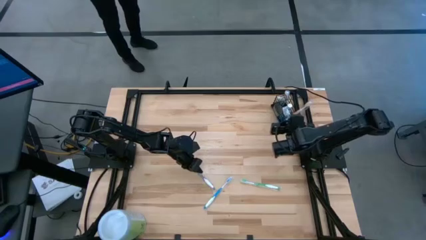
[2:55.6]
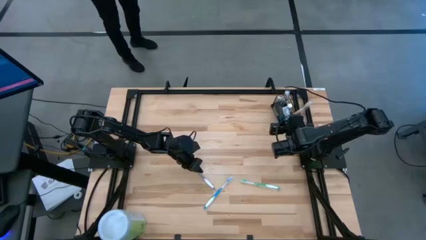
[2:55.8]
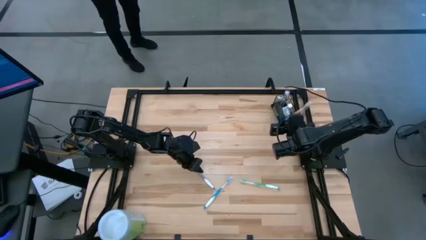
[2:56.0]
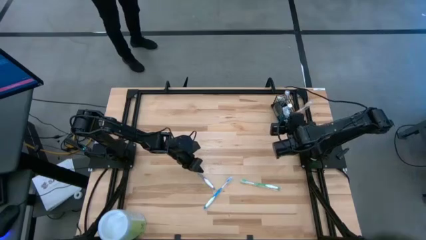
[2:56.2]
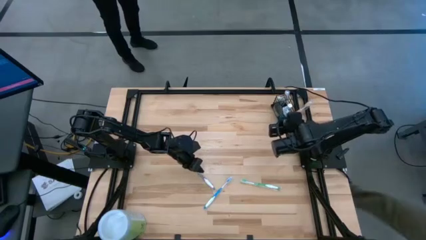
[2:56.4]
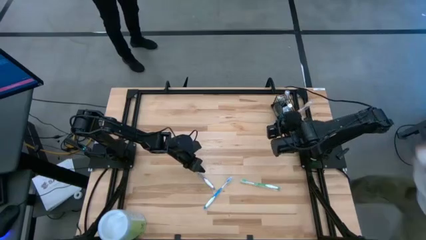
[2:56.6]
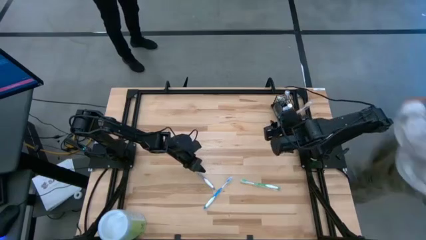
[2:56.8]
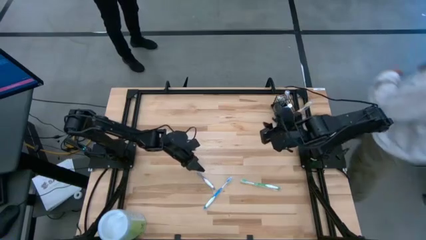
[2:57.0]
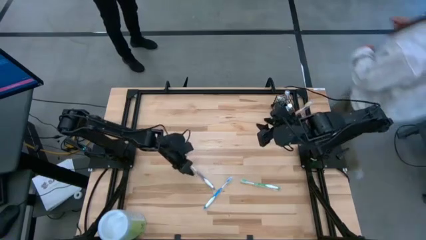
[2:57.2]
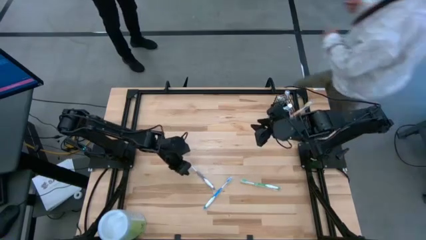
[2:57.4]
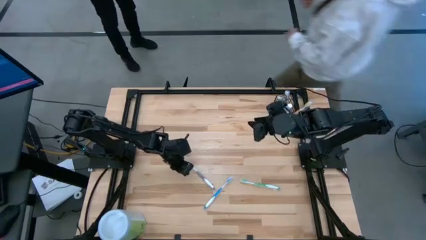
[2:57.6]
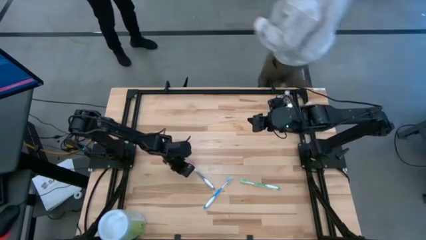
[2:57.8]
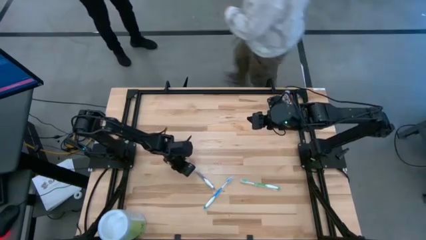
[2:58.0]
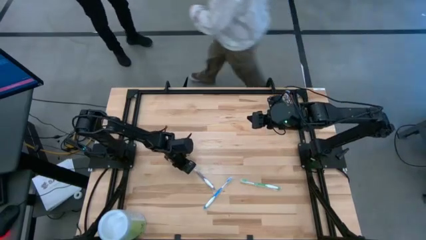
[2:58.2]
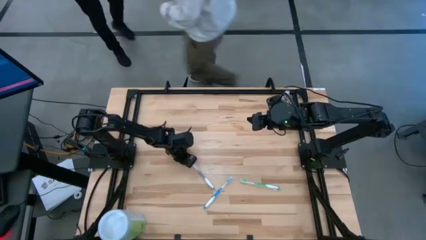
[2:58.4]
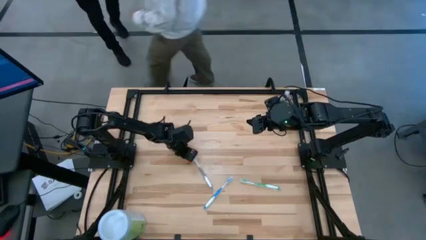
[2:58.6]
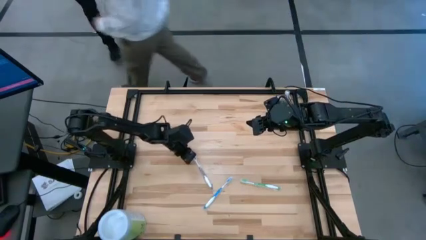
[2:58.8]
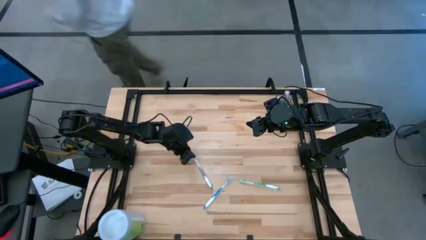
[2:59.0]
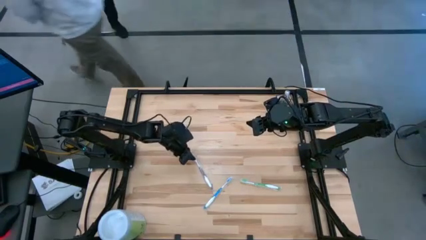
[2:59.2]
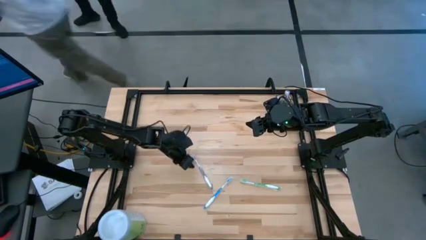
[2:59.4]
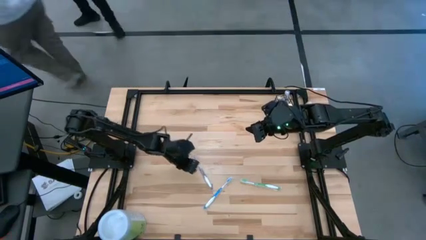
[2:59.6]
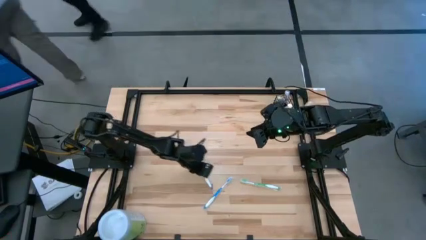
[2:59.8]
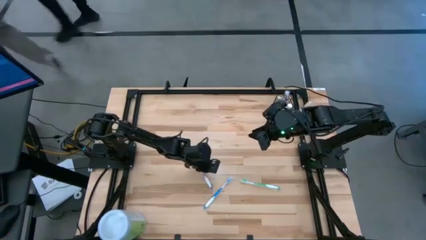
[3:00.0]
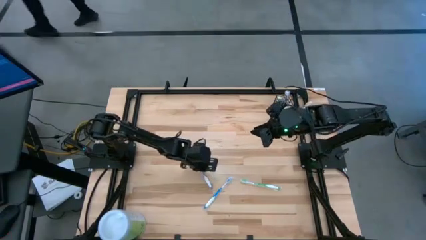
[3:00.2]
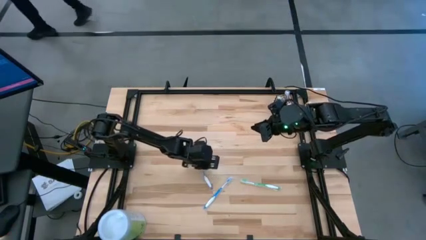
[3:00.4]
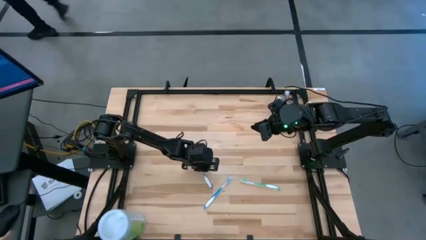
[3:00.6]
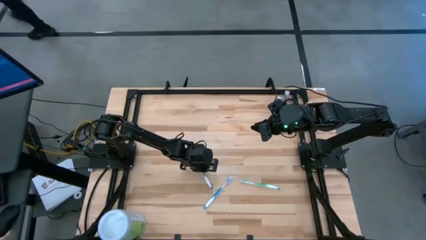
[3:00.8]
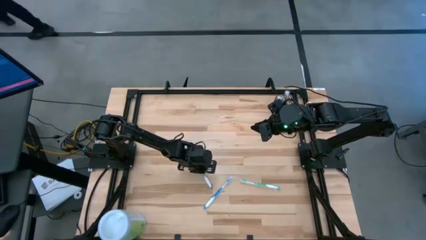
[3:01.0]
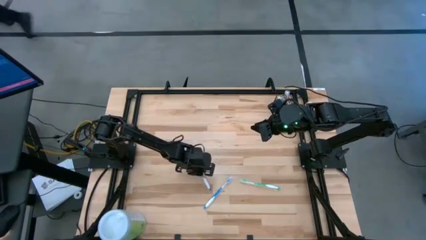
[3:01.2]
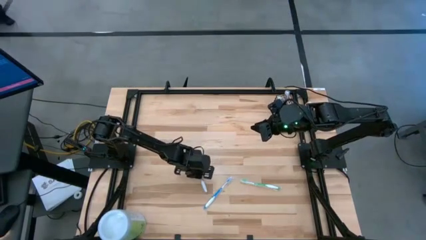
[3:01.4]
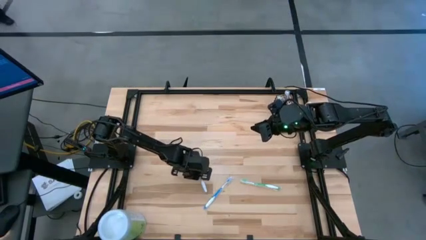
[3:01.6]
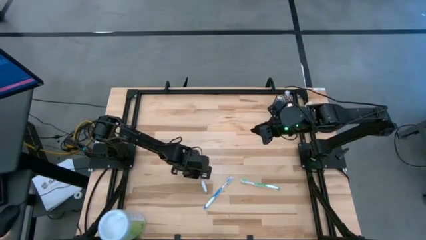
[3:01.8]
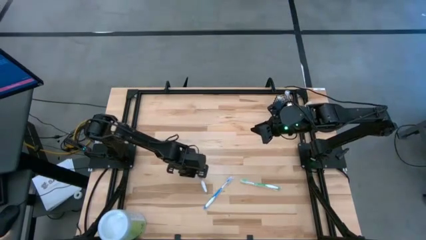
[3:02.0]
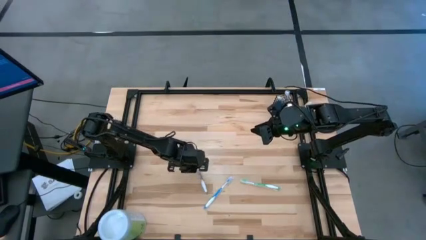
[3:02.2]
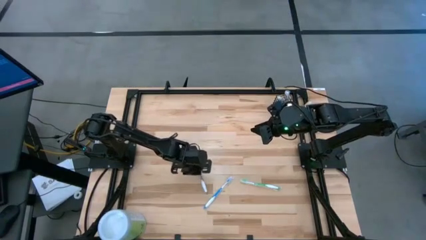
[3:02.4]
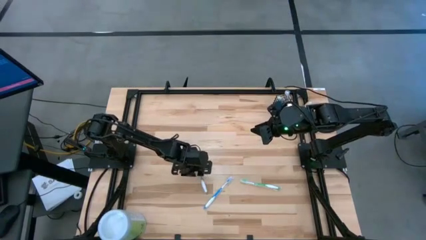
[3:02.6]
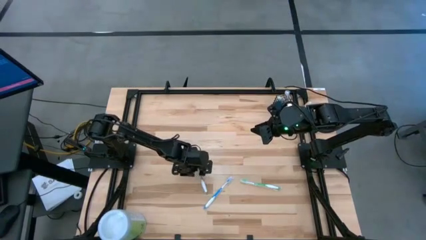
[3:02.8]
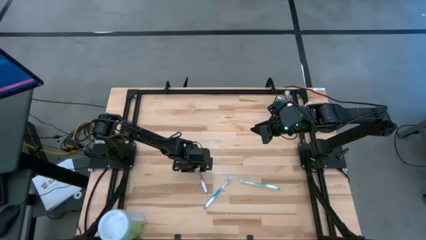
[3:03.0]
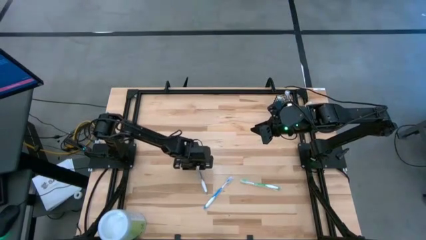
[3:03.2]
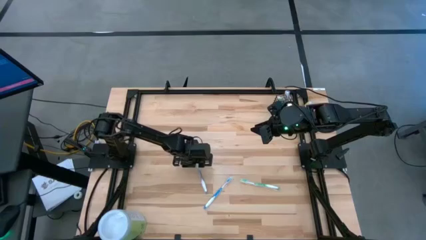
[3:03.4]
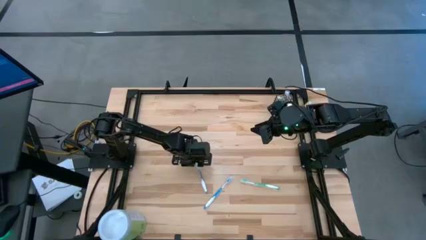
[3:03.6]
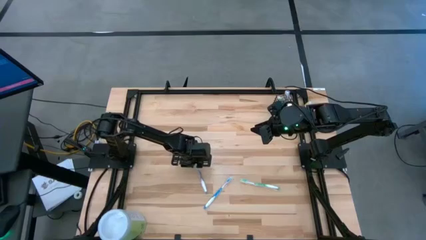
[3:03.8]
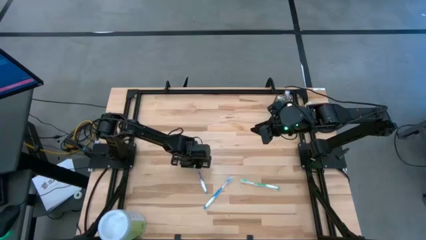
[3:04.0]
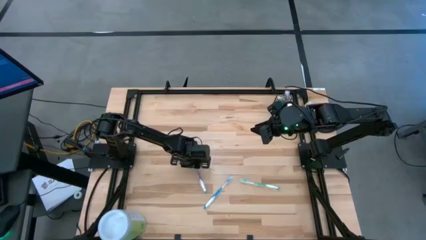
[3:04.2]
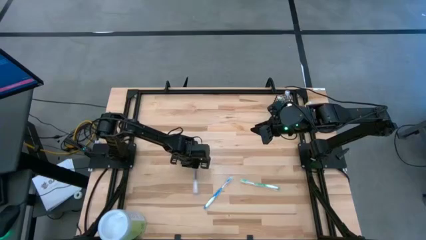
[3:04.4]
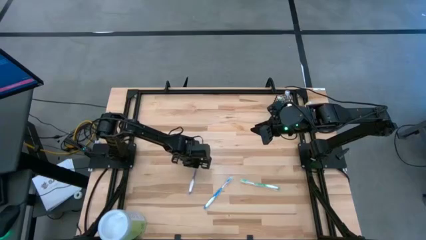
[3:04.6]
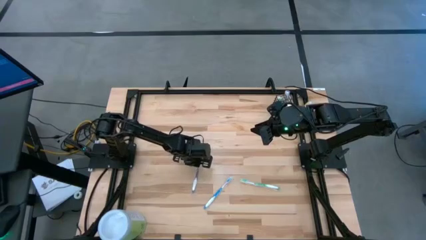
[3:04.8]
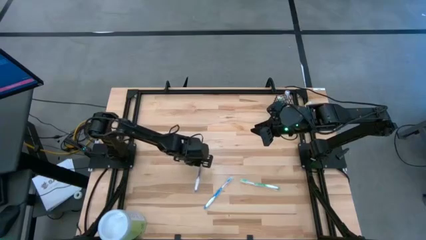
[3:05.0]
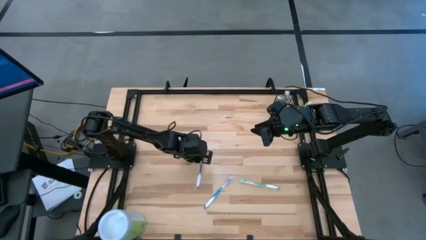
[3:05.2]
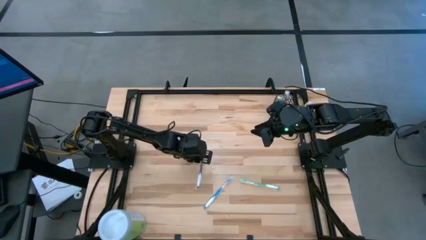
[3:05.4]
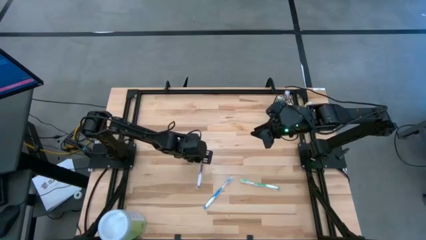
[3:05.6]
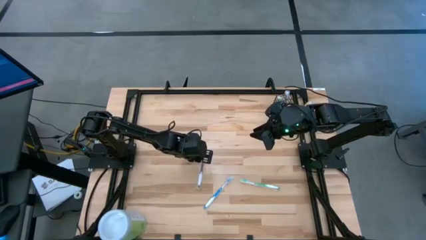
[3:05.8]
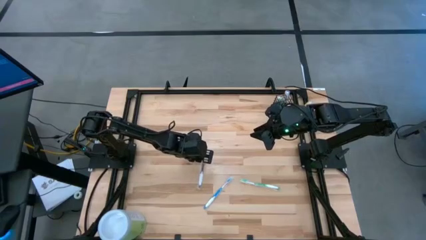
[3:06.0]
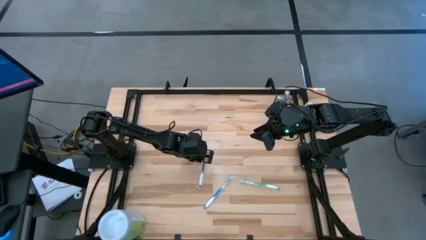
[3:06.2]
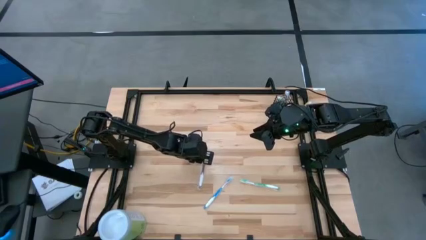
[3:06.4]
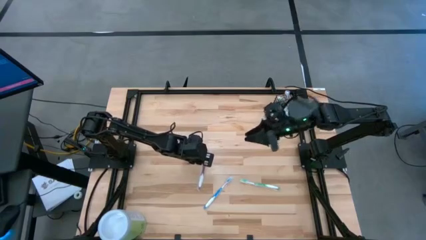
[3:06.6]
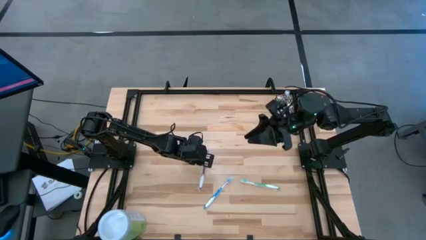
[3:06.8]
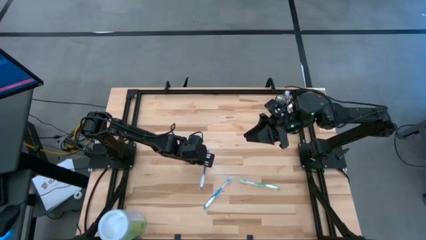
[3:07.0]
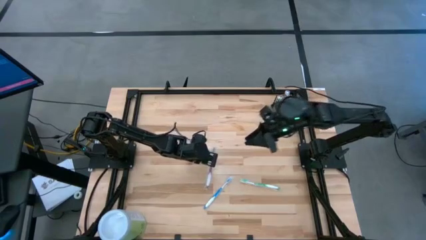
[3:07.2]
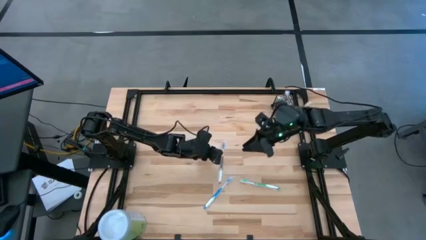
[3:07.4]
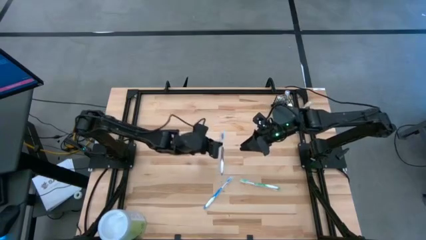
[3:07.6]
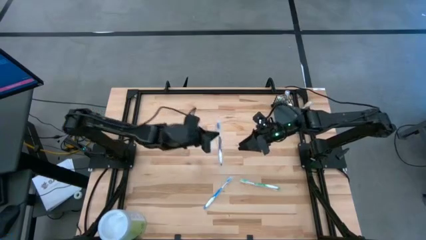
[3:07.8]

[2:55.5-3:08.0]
Task: Pick & Place toothbrushing station
Put the purple toothbrush in the left section of wire organizer

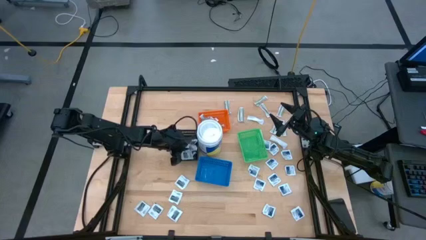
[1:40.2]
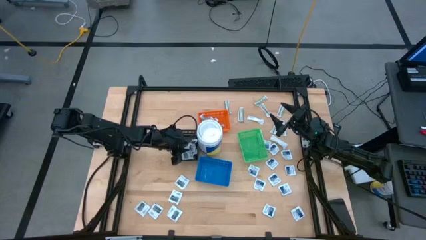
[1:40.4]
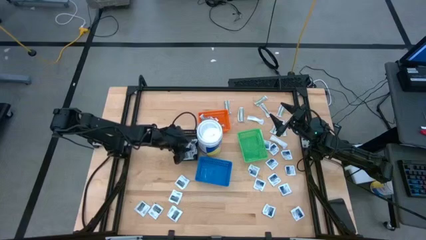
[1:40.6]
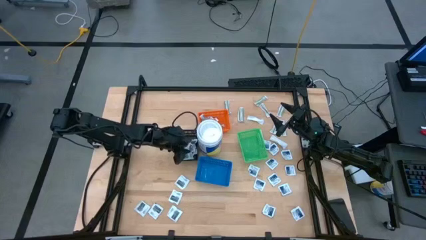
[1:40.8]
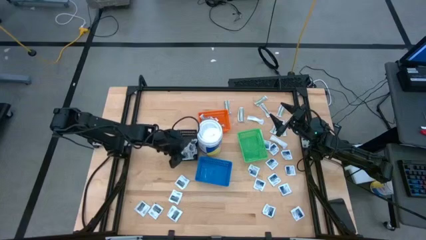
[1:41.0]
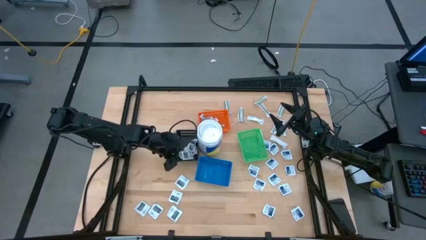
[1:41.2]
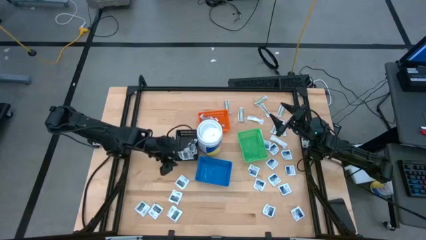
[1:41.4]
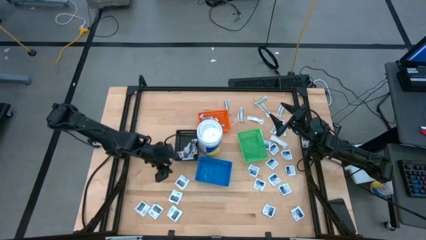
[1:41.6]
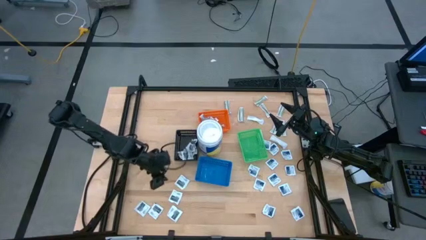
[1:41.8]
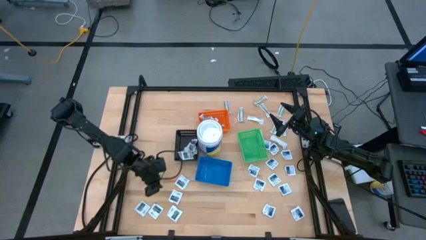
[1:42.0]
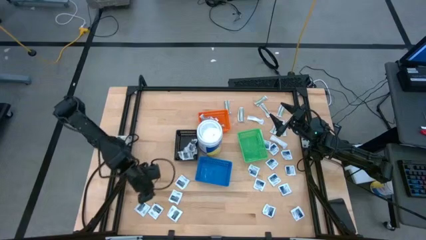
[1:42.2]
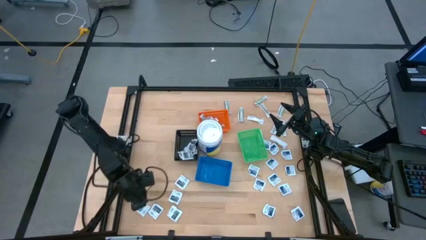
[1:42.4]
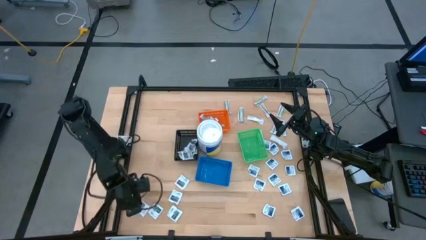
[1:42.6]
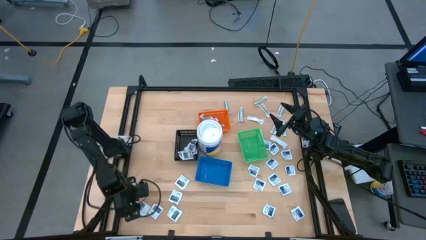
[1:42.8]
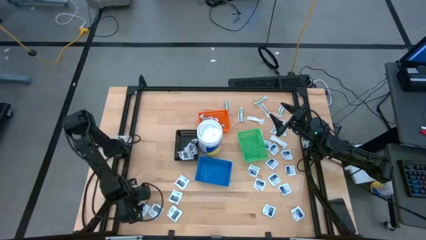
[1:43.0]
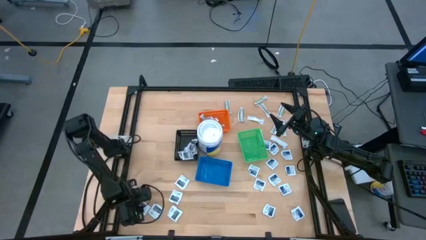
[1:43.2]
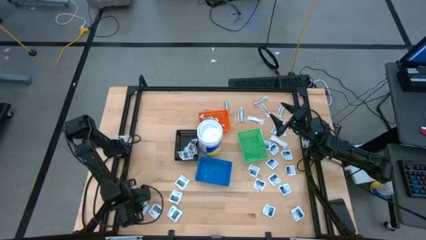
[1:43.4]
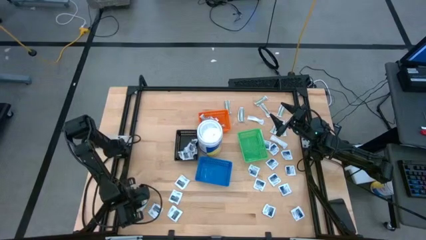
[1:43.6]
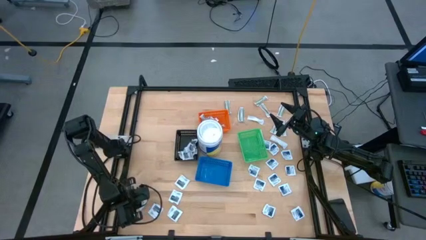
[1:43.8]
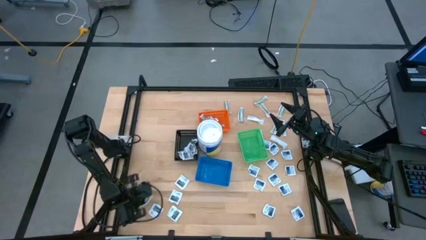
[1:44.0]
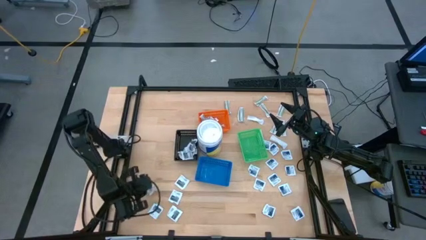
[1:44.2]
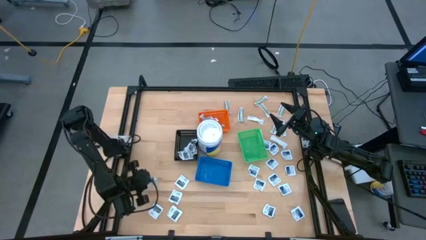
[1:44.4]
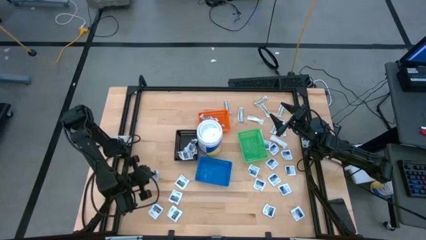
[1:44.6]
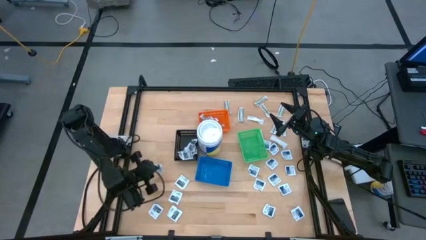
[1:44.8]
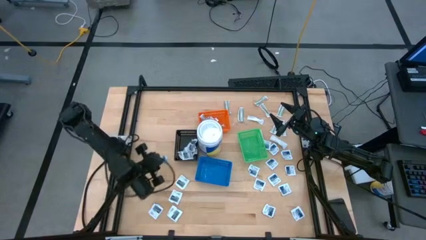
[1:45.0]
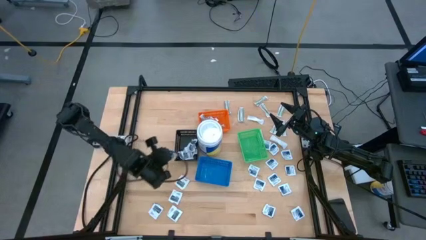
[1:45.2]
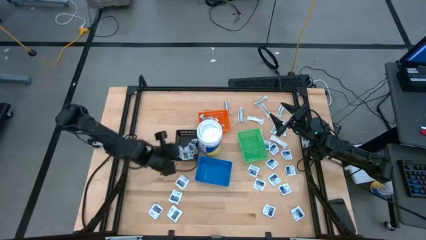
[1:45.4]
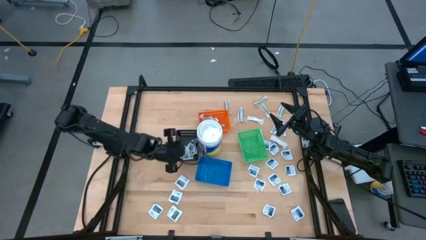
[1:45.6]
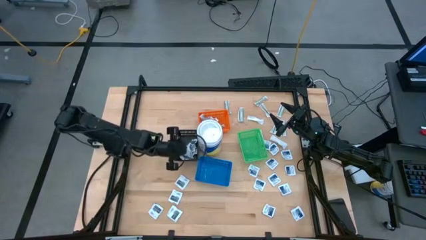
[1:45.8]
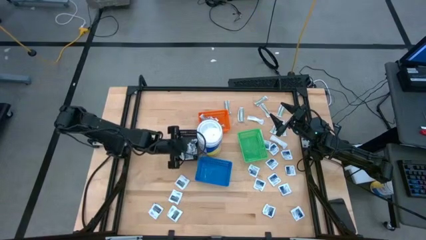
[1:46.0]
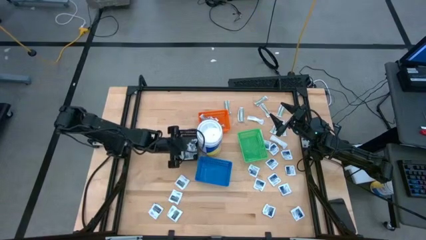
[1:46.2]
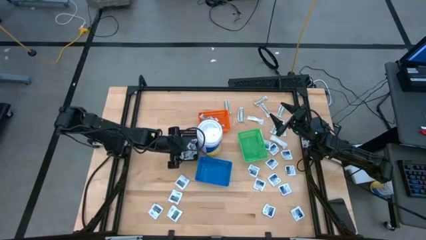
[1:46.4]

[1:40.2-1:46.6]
Task: Pick & Place First Aid Supplies
Put the gray towelette pack into the black bin
